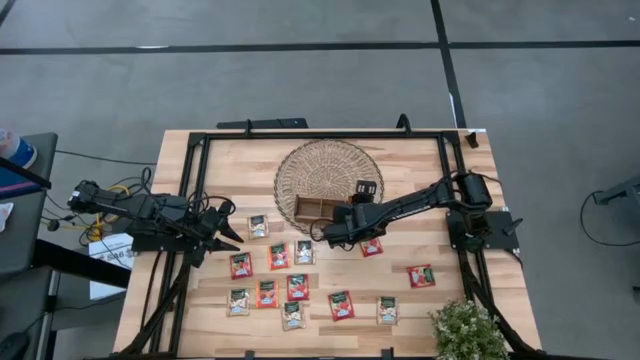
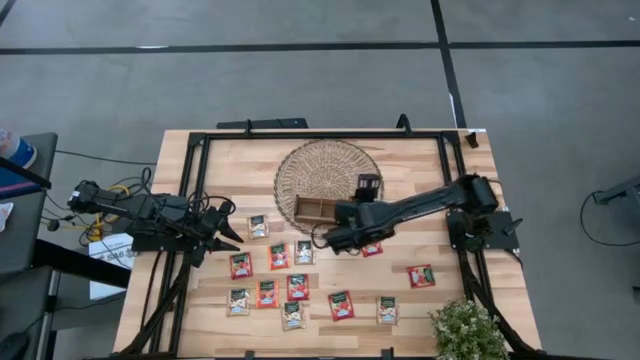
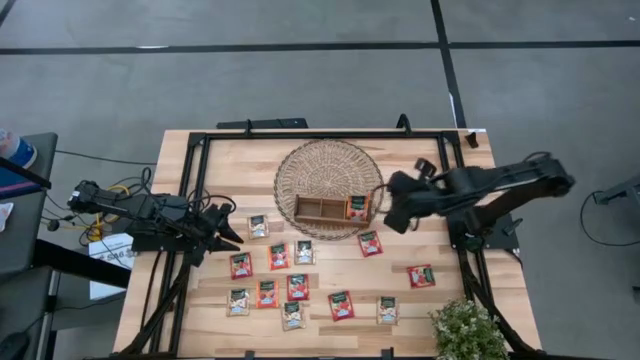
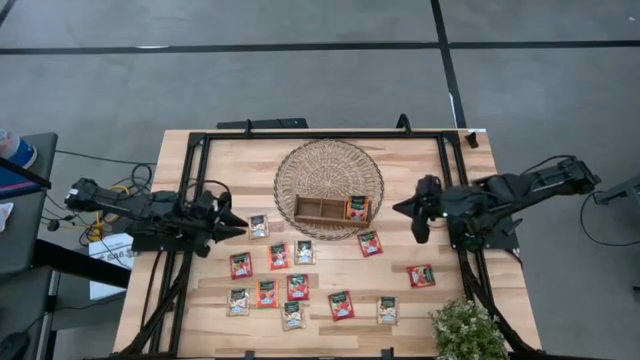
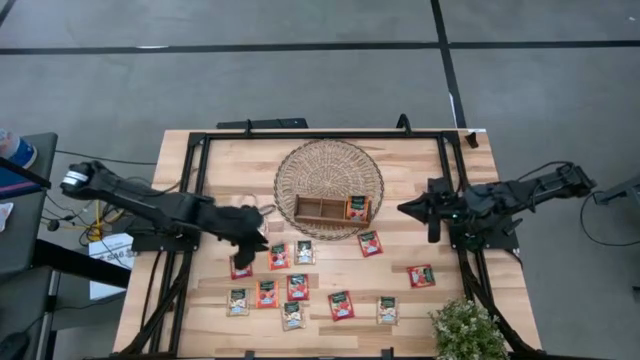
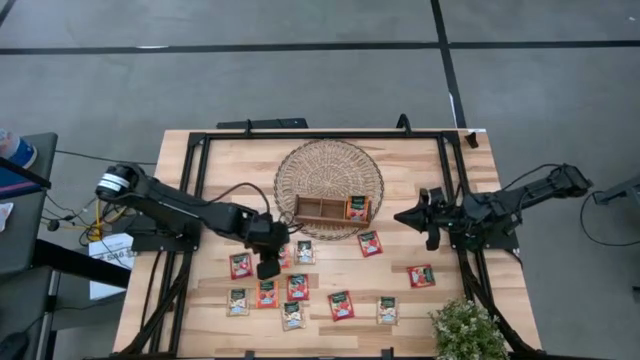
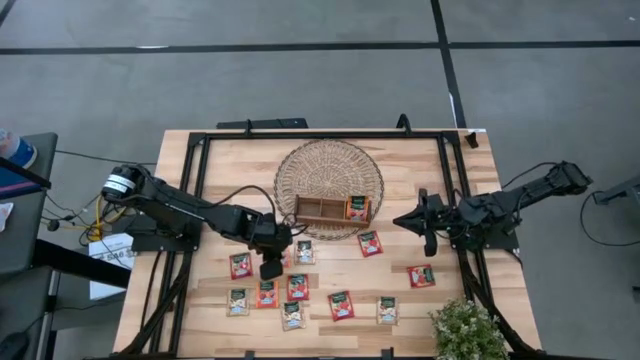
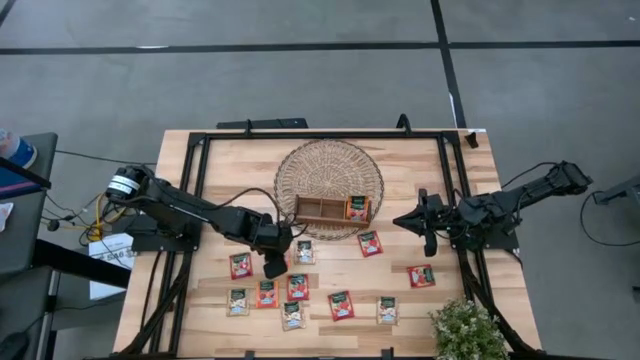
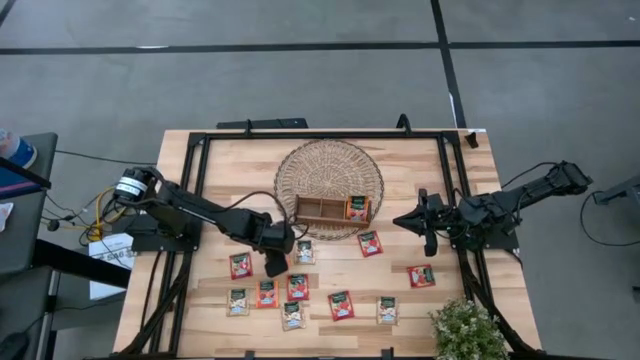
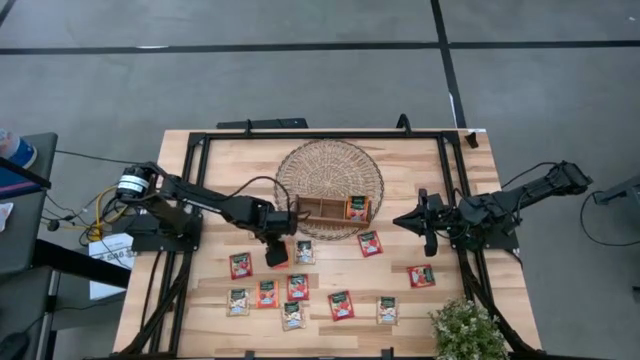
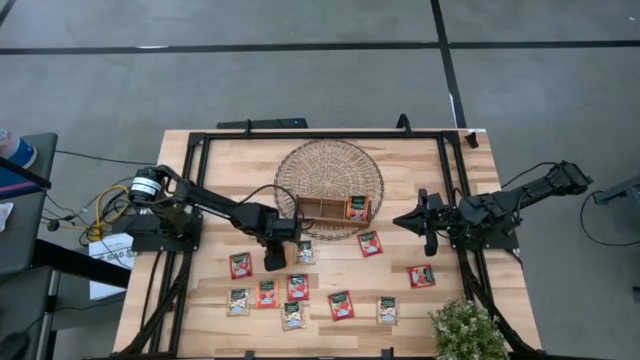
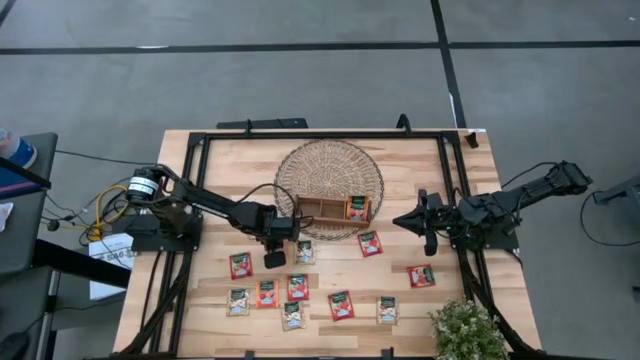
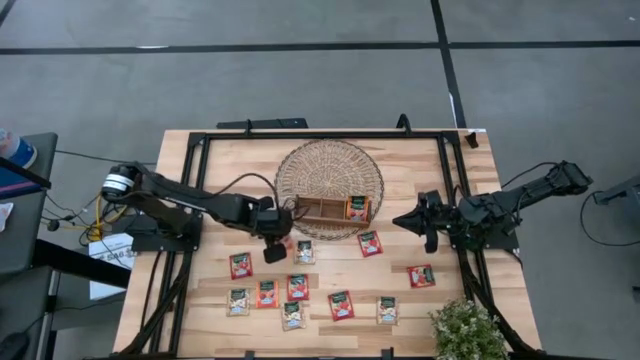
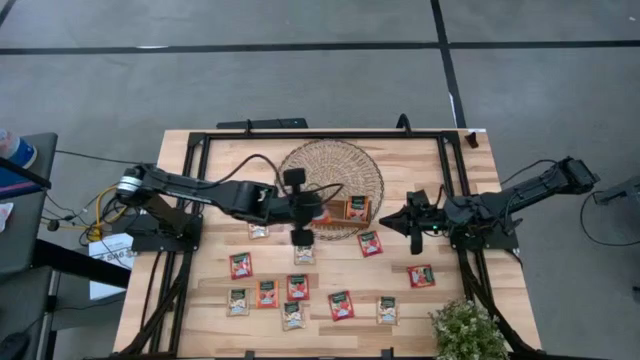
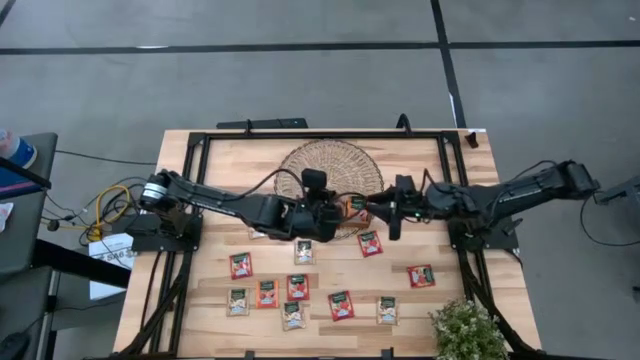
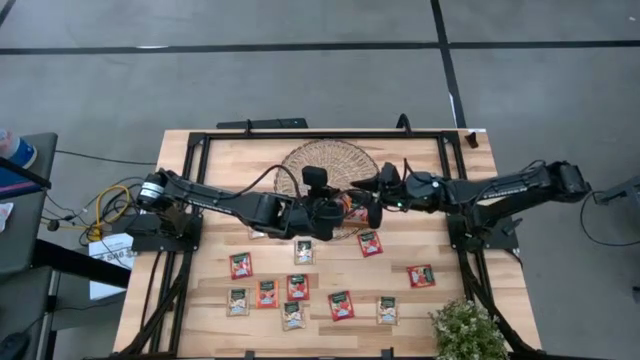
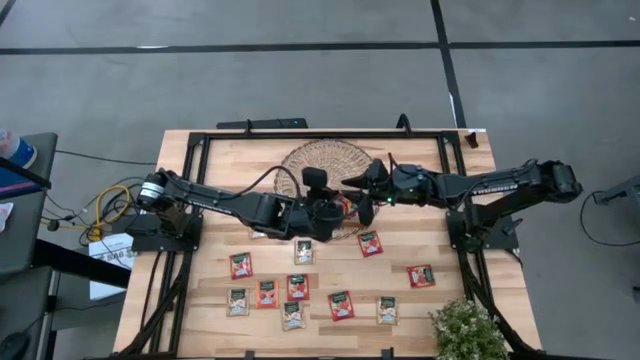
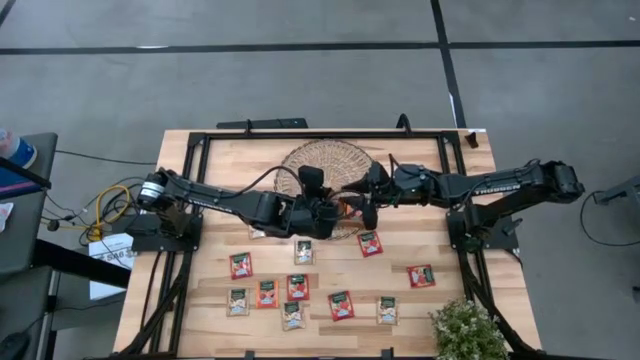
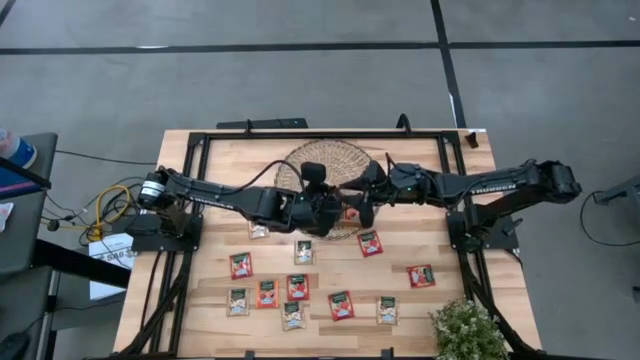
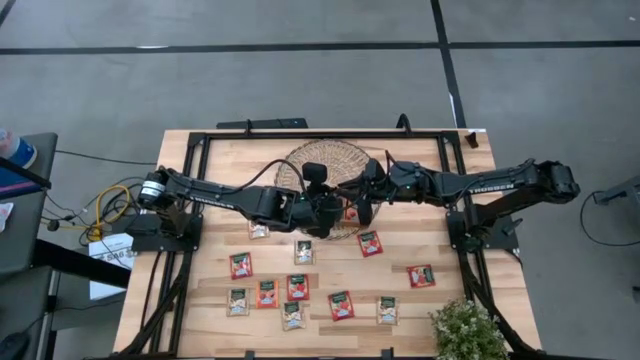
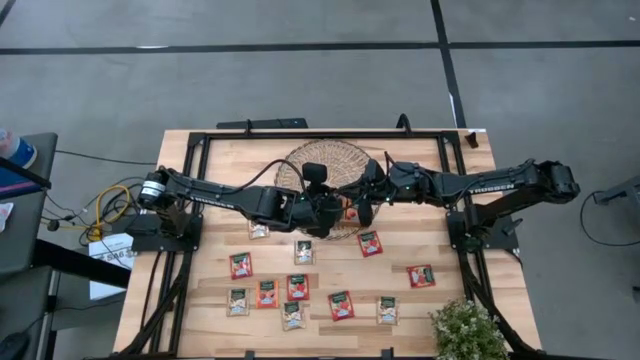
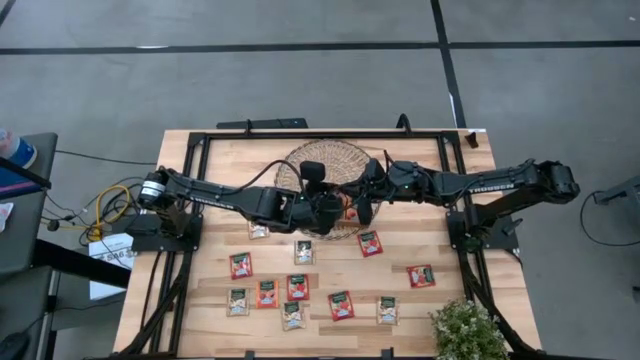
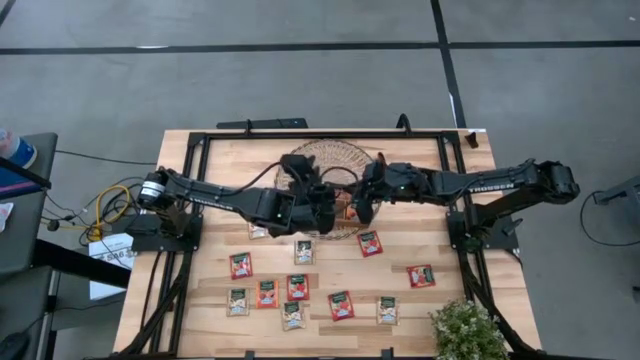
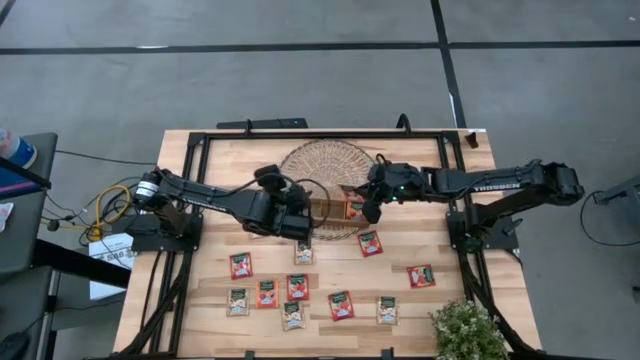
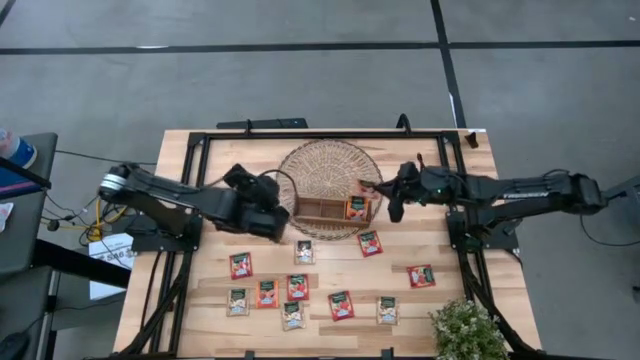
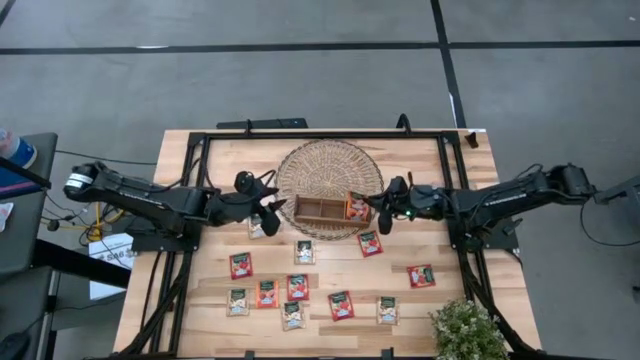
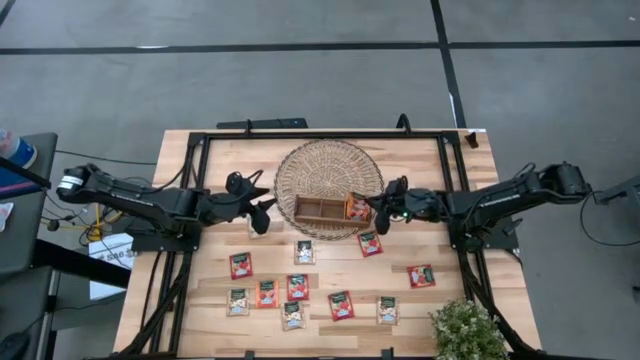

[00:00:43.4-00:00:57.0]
Task: Pick & Place Tea
Put the orange tea bag into the right section of the wooden organizer
